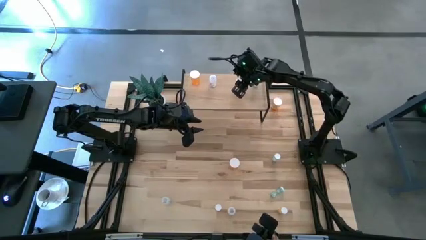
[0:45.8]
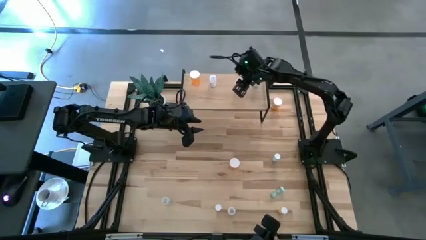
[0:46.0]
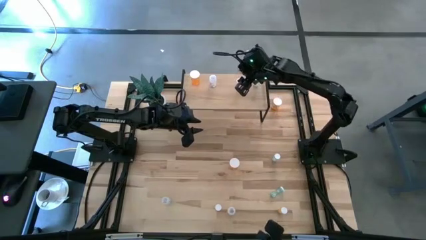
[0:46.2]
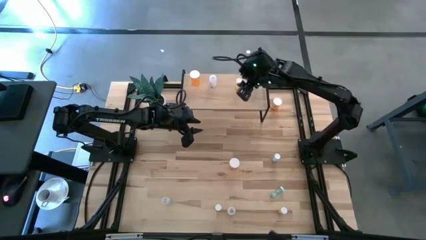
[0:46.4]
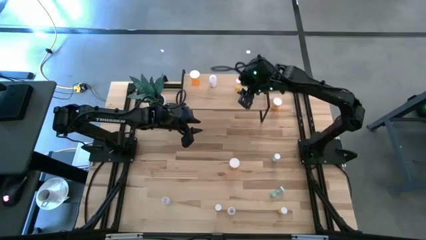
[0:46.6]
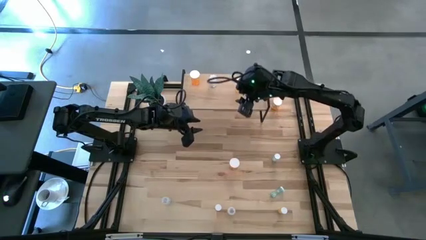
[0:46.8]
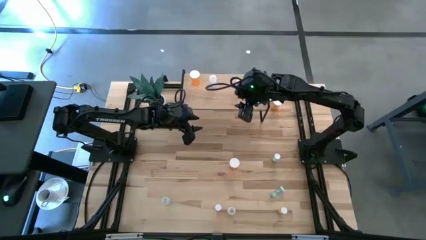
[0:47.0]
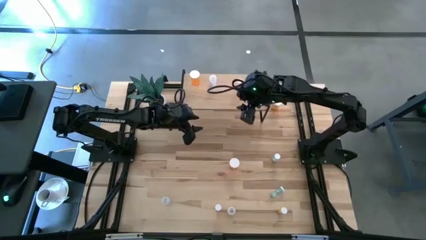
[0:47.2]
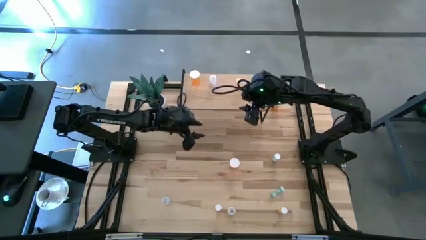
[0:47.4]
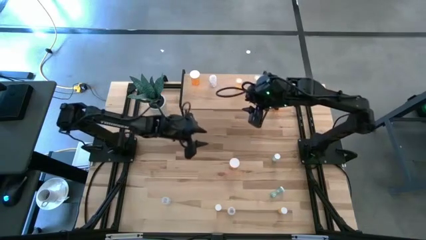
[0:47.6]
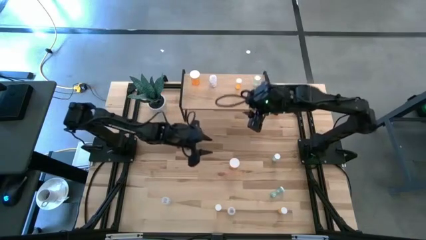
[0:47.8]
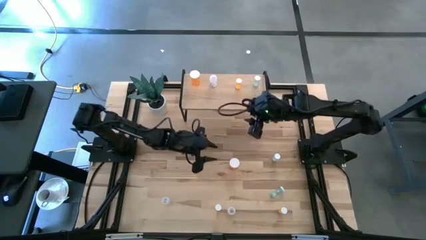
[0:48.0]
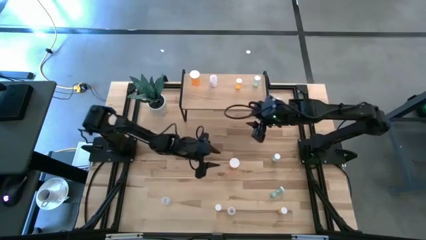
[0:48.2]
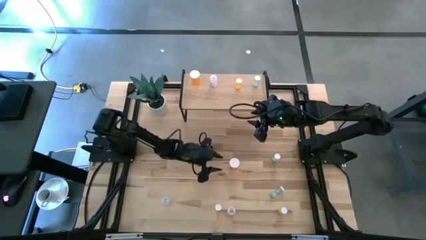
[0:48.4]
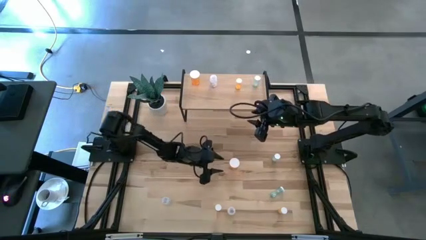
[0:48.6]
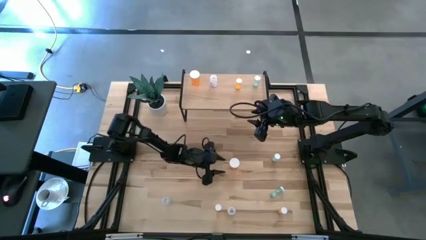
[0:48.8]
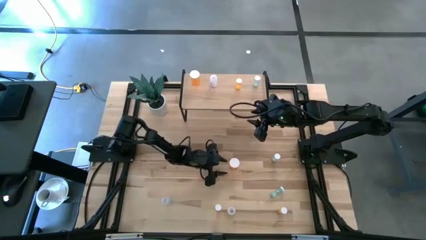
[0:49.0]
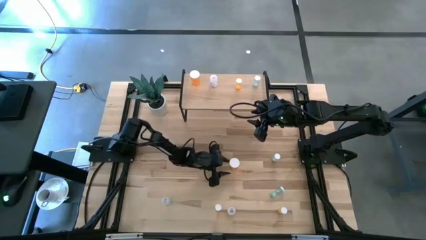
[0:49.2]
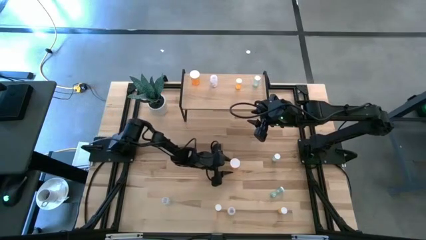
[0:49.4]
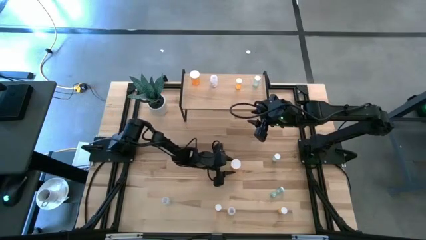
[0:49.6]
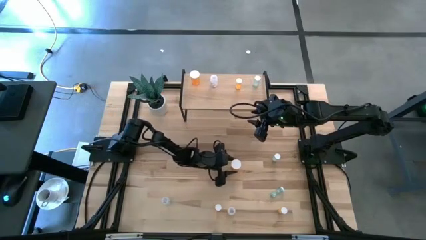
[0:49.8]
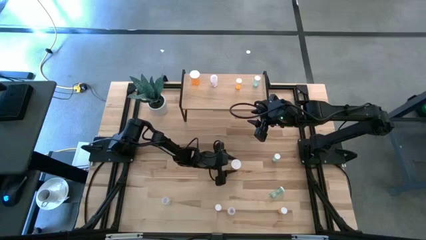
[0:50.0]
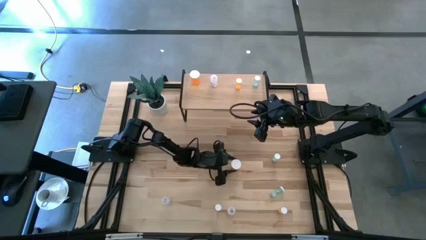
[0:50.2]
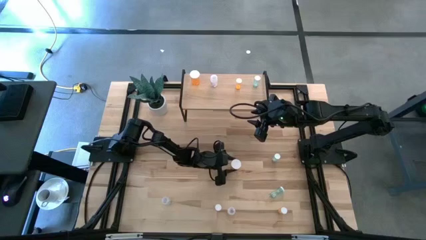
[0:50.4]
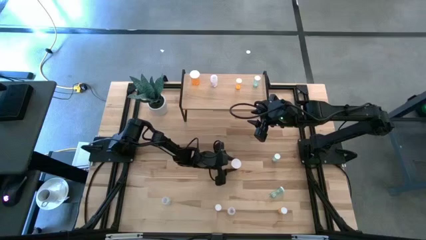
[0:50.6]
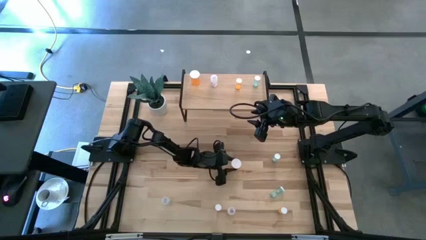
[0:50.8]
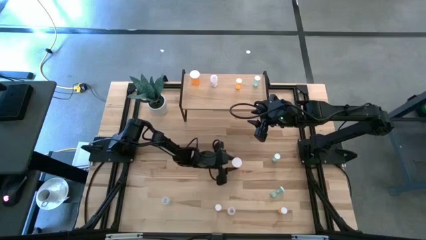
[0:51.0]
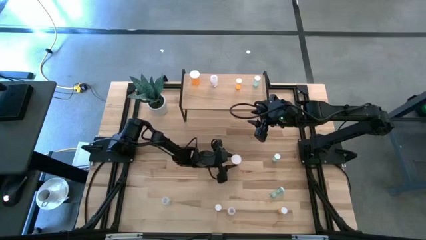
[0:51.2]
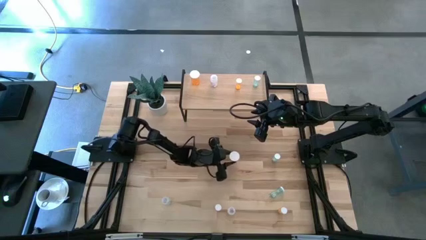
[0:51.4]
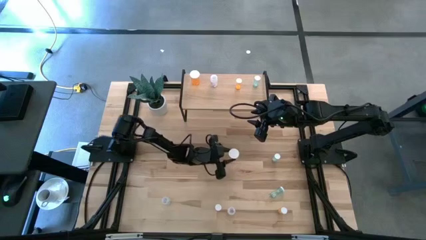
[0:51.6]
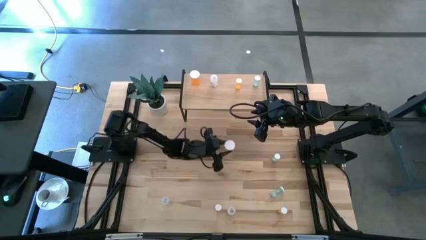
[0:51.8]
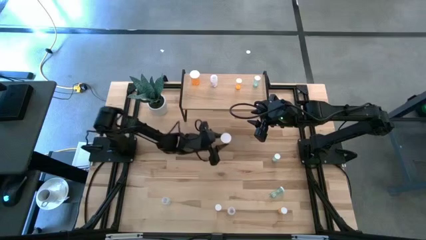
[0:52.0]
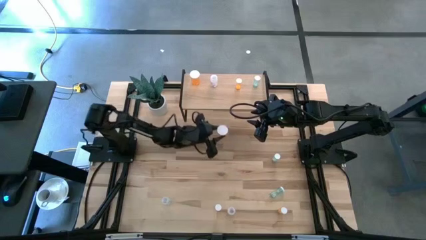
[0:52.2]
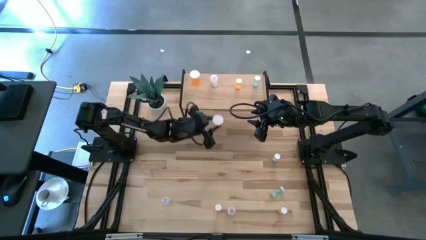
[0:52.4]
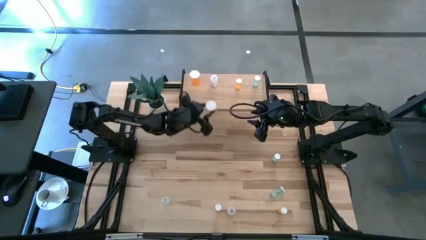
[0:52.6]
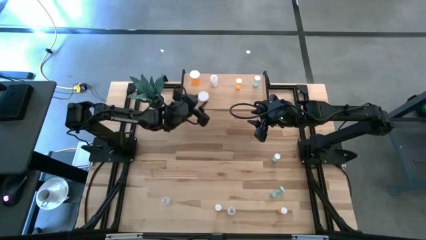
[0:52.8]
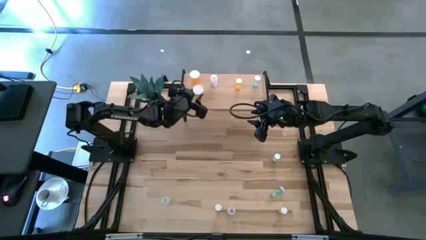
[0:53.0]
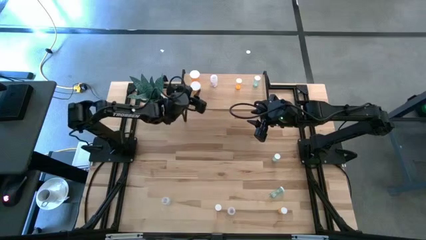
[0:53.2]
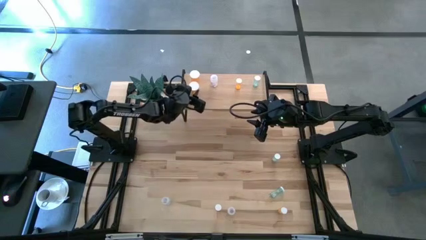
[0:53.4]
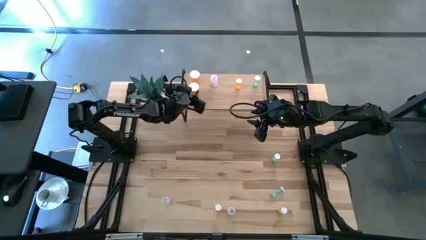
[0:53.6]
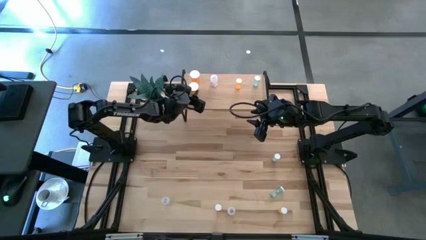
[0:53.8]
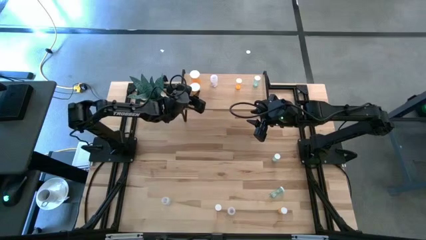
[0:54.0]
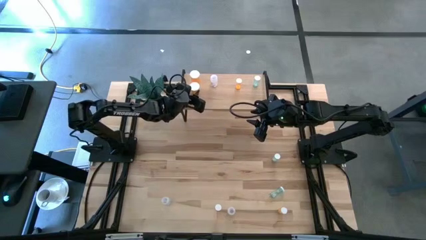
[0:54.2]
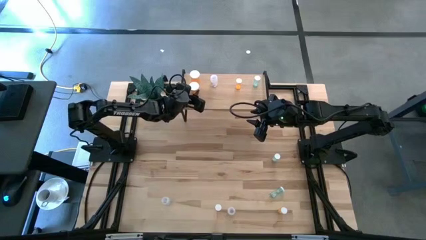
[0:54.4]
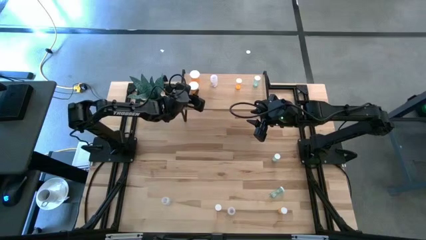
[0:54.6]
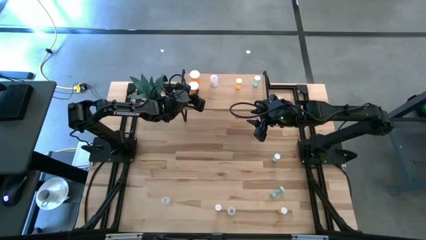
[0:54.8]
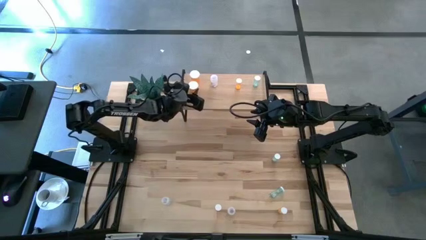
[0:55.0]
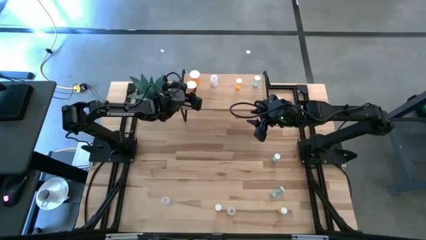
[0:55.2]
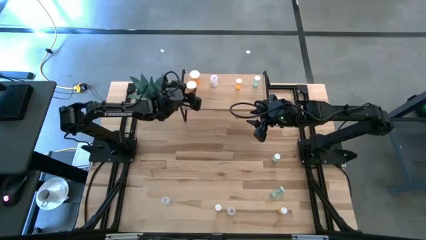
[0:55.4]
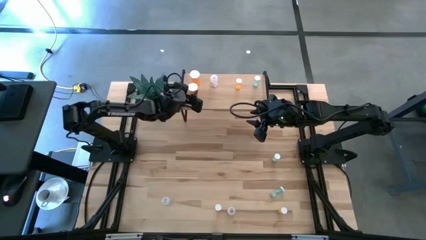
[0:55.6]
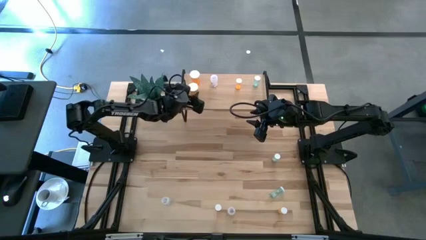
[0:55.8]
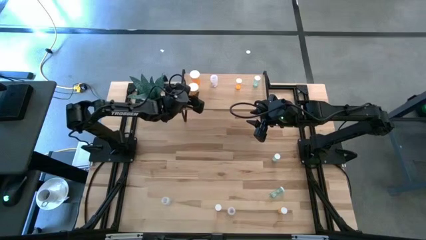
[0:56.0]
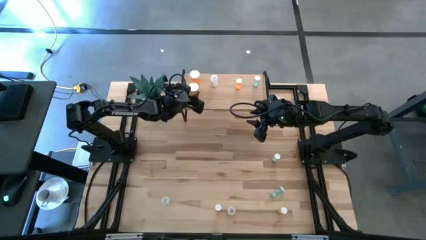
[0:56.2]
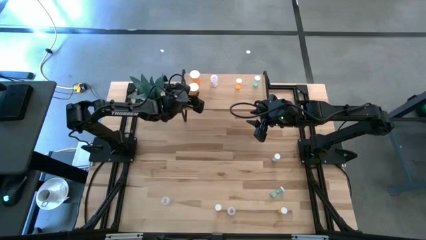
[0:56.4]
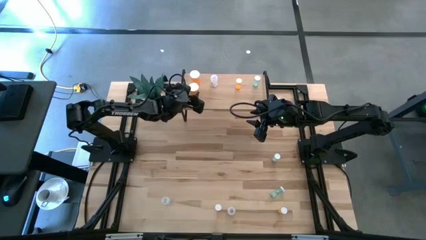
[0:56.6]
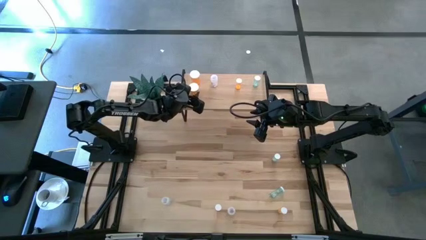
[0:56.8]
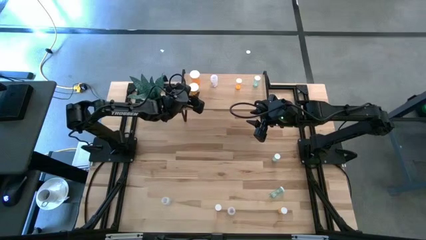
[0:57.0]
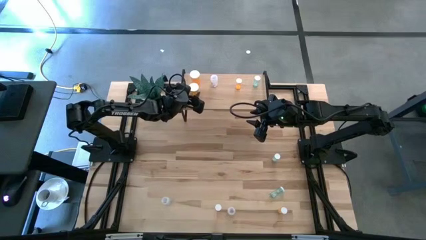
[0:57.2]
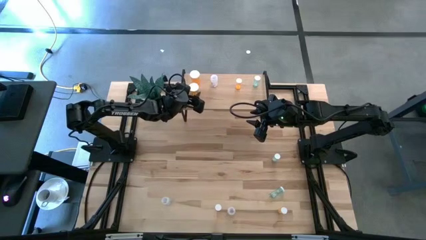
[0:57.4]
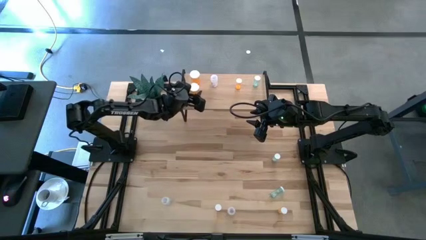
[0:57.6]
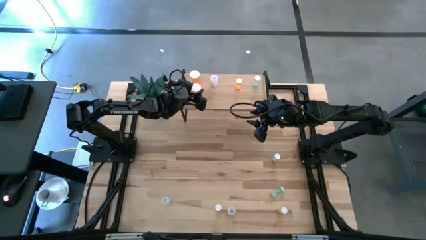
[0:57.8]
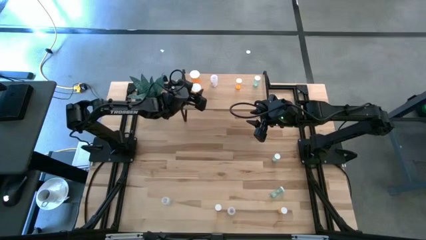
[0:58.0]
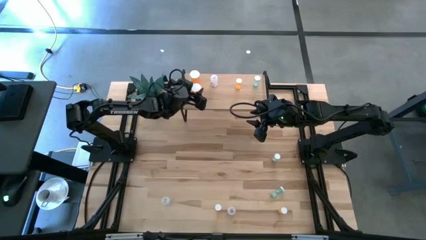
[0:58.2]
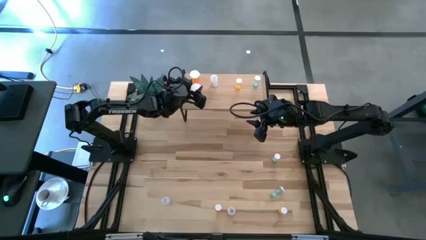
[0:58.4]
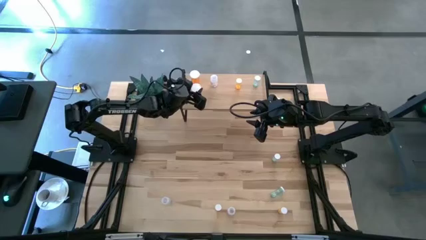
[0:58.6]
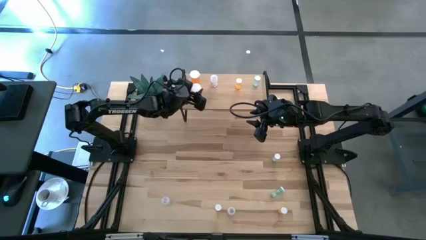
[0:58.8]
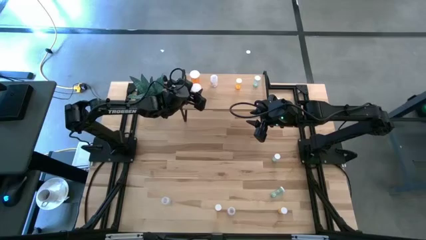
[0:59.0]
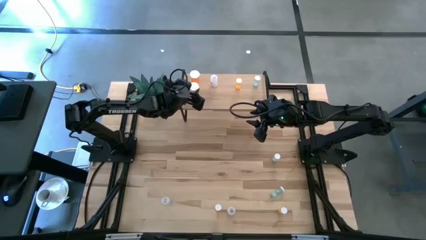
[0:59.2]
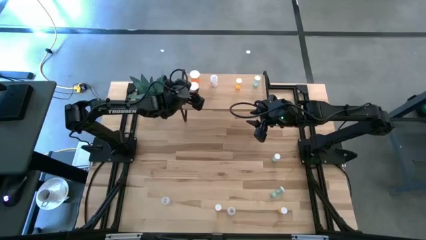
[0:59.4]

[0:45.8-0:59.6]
Task: Pick and place medicine bottles onto shelf by color
Put the bottom large orange pill bottle aligned with the other large orange pill bottle on the shelf
